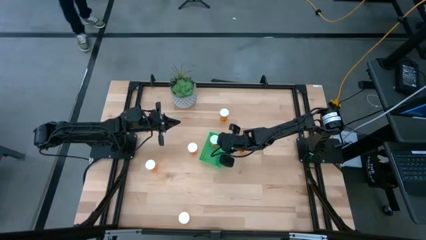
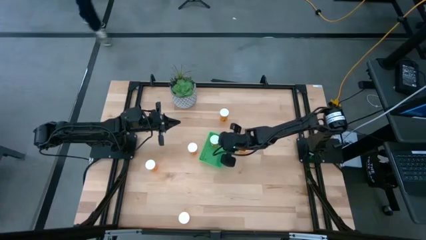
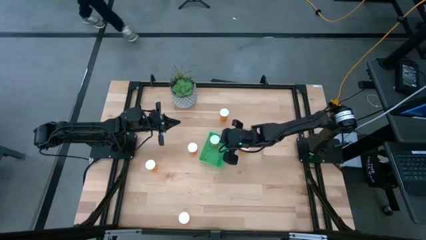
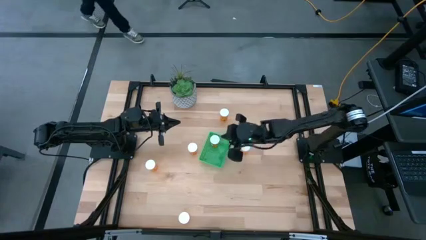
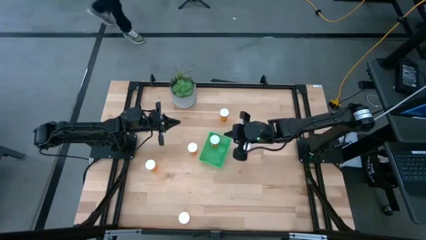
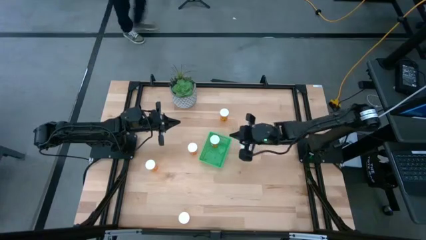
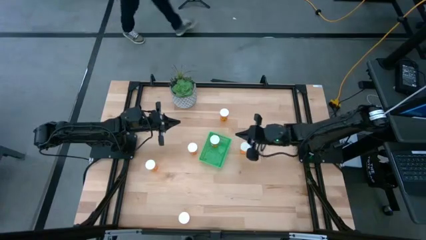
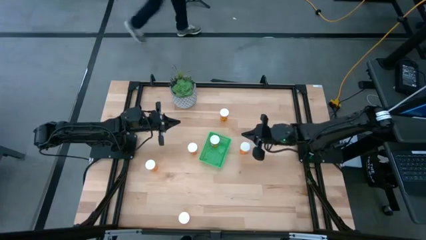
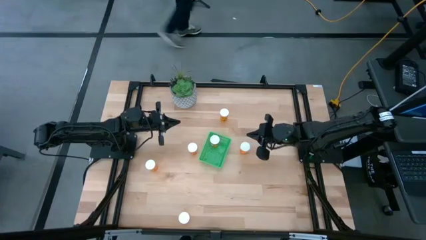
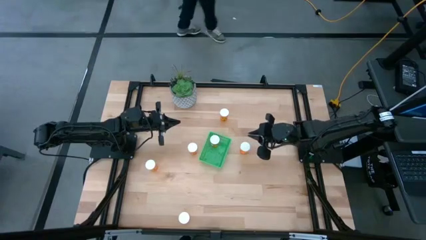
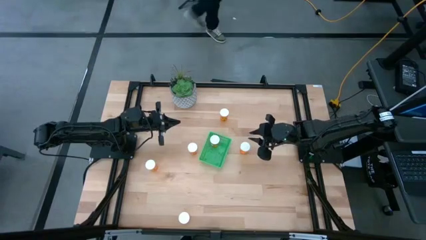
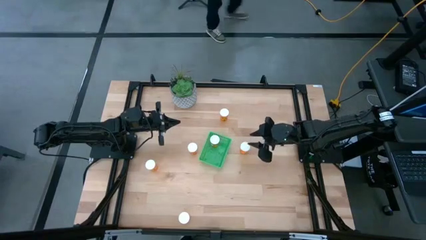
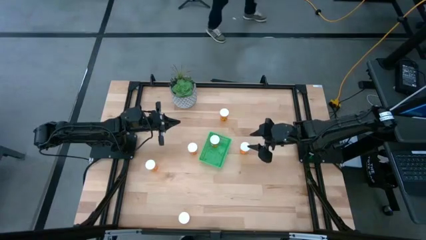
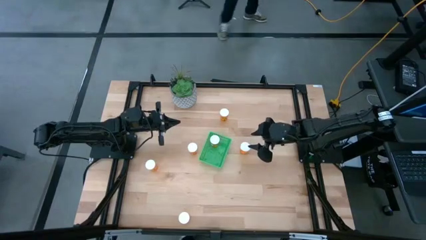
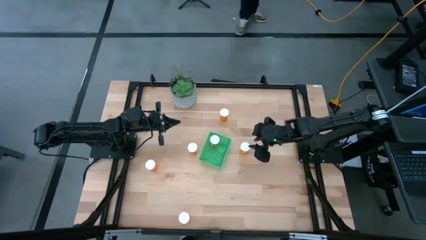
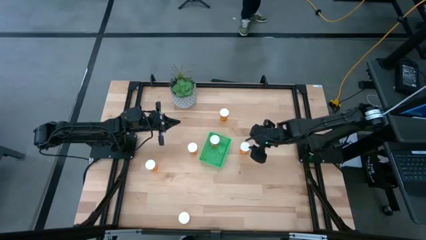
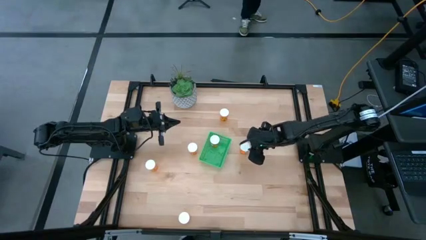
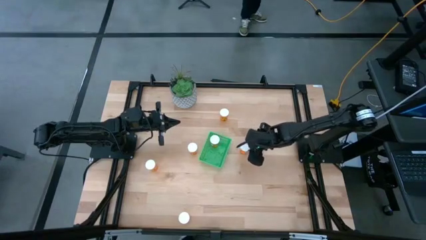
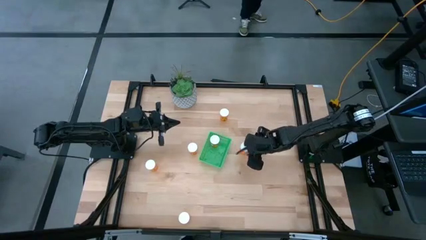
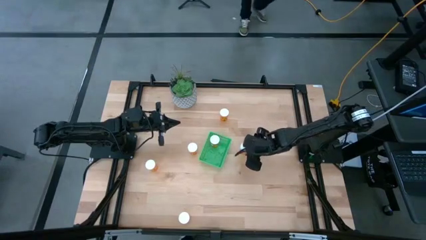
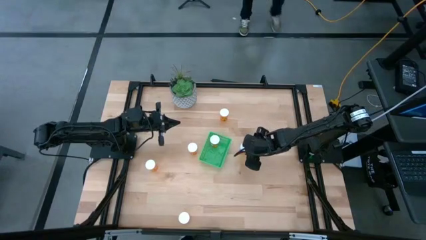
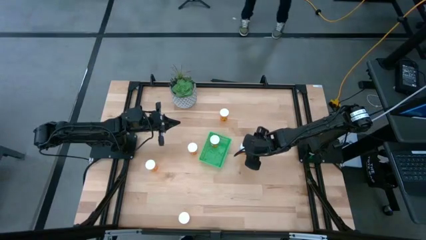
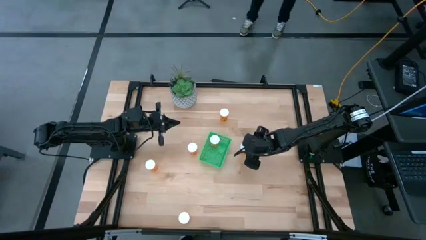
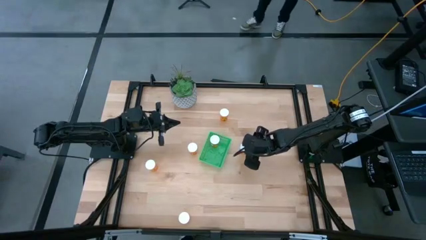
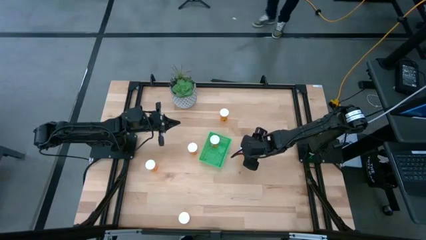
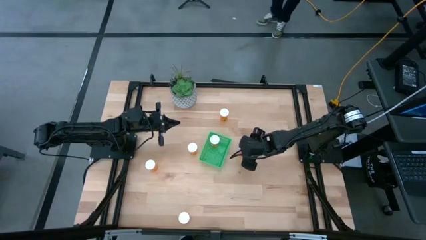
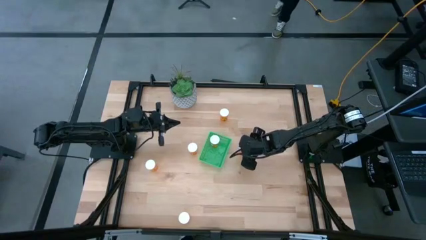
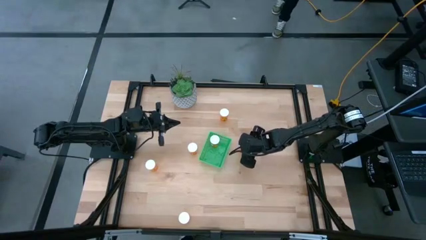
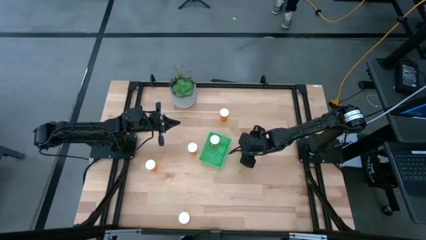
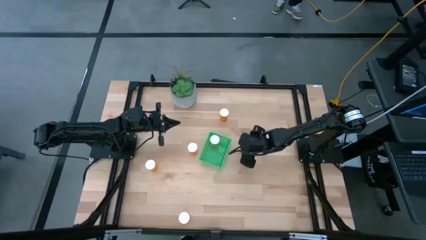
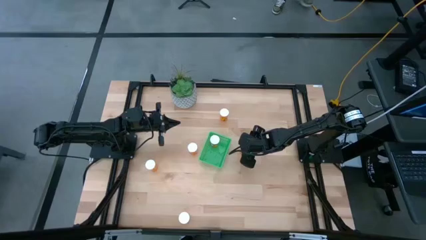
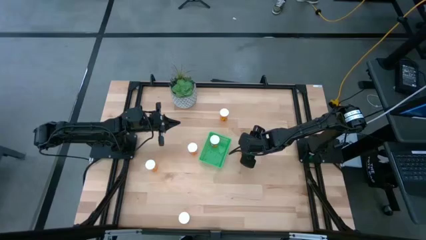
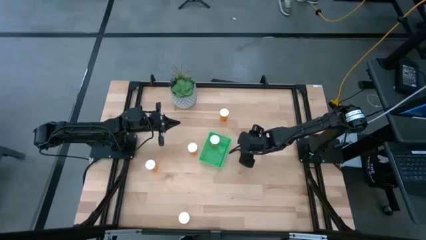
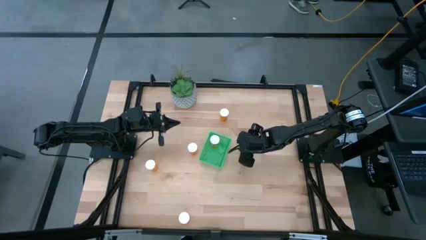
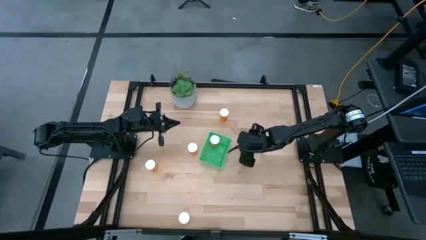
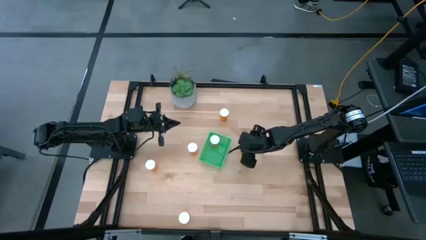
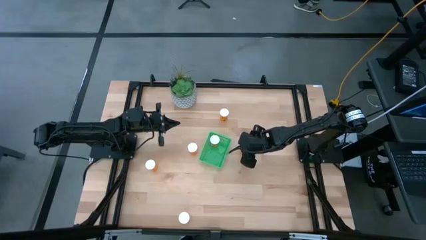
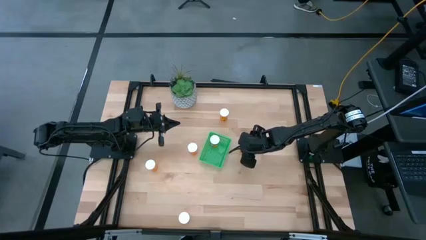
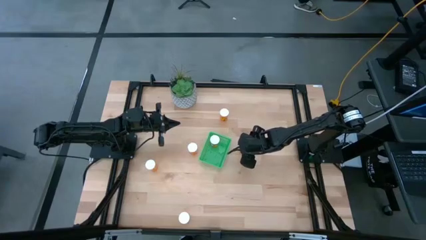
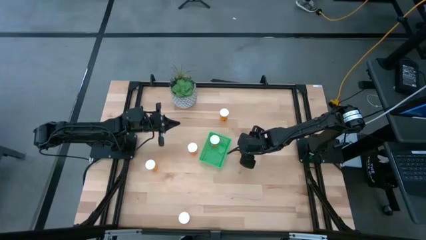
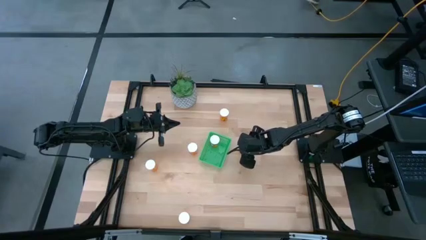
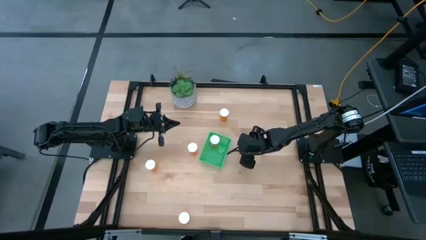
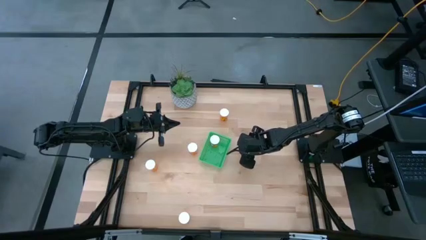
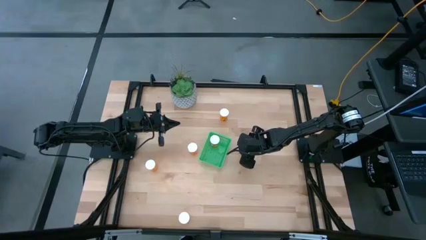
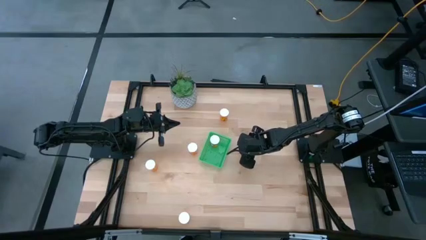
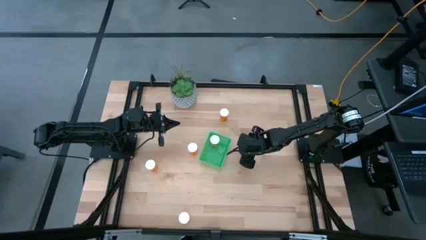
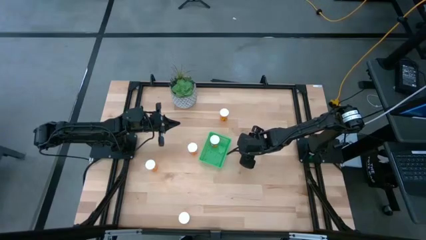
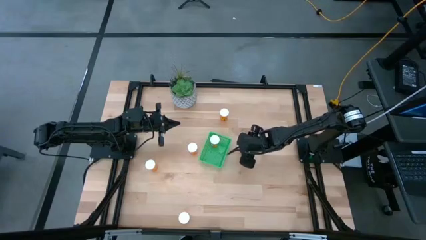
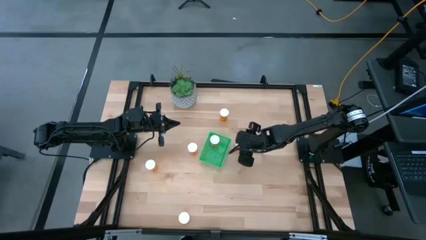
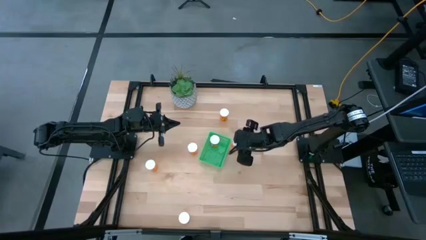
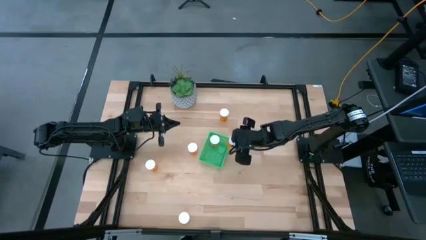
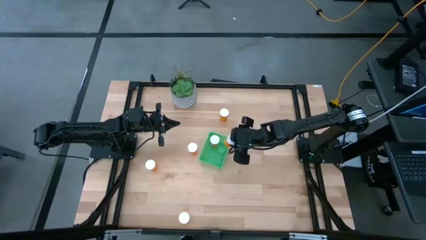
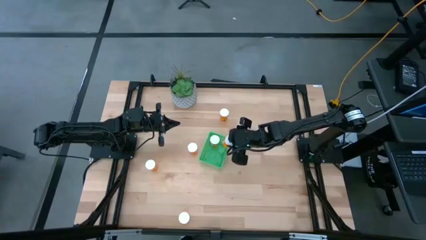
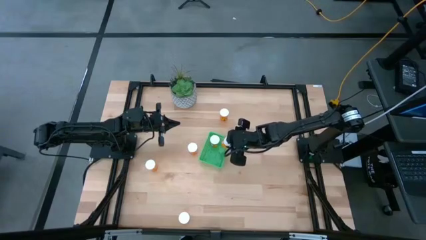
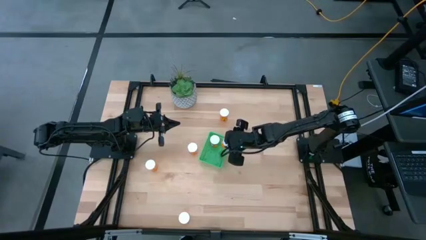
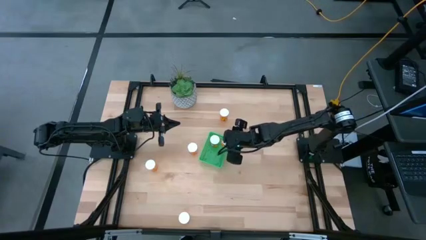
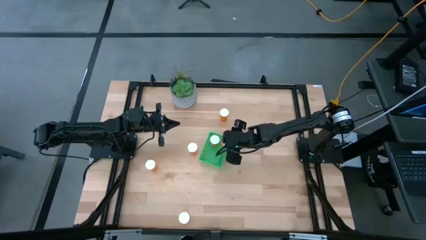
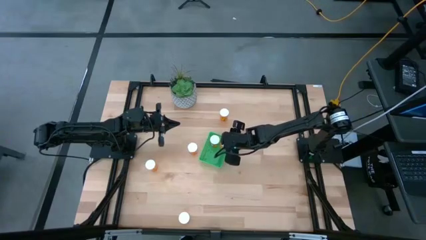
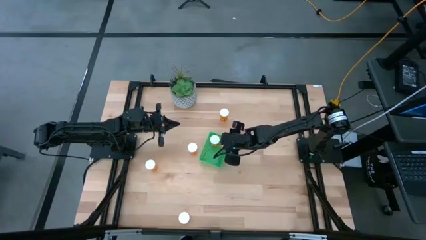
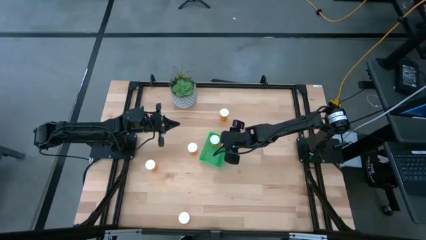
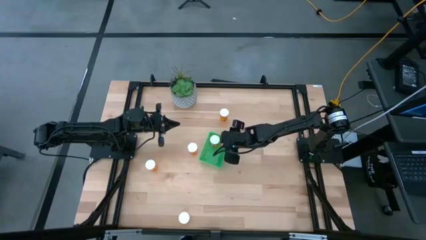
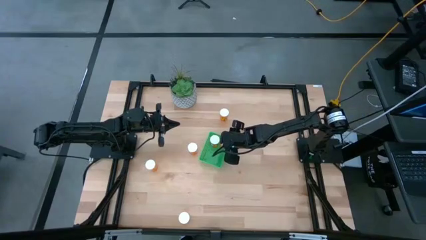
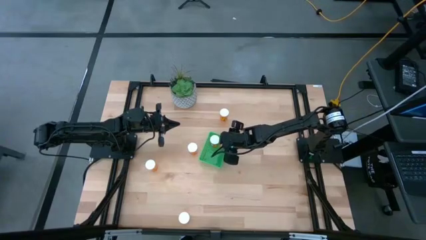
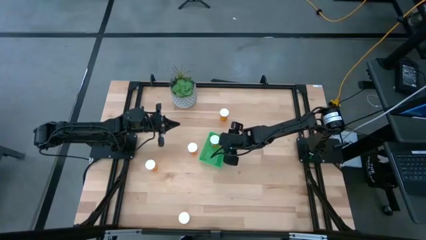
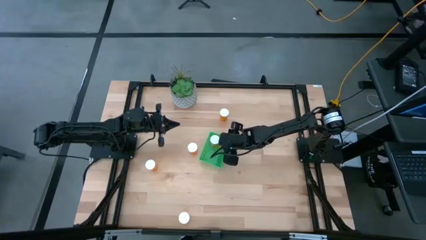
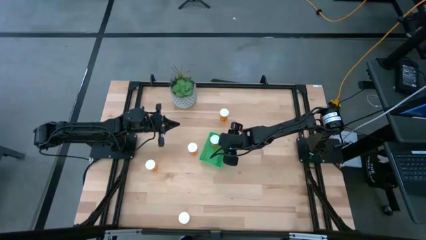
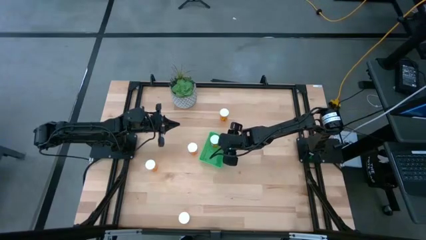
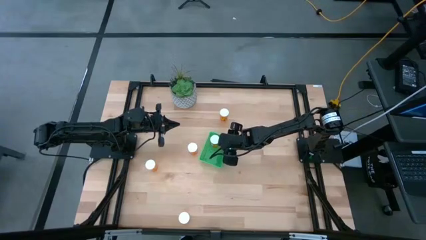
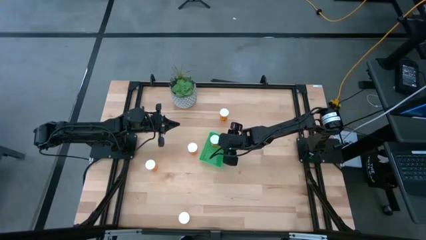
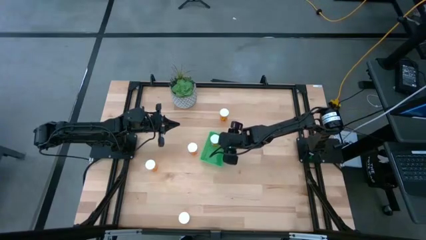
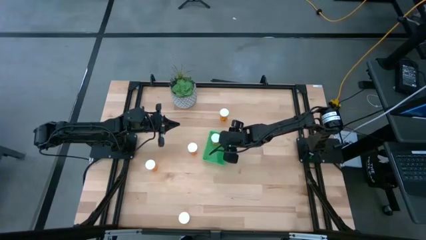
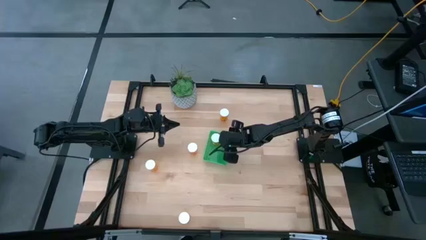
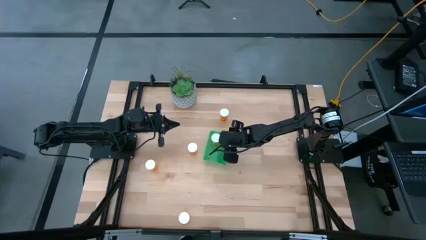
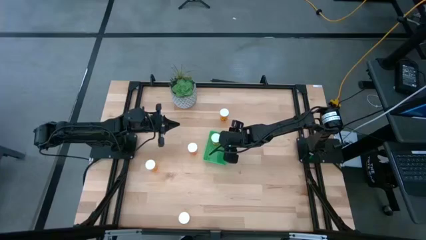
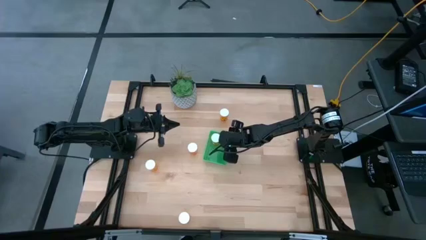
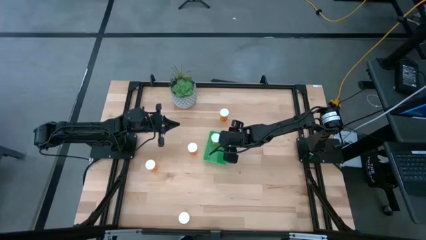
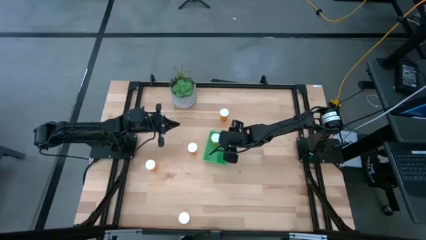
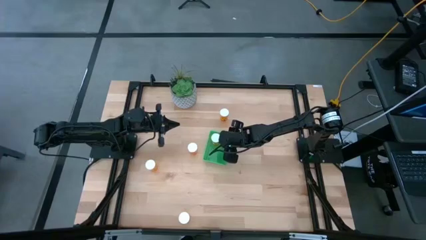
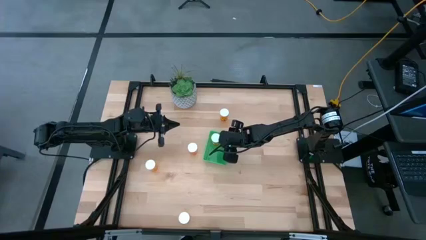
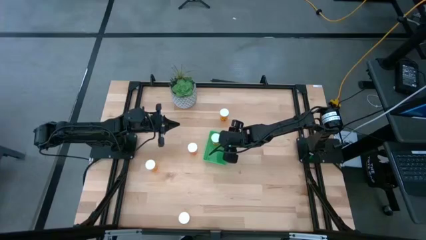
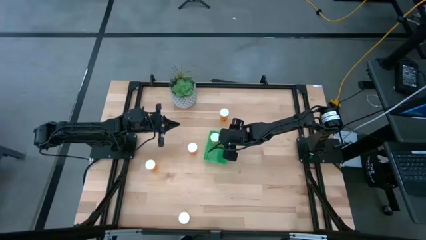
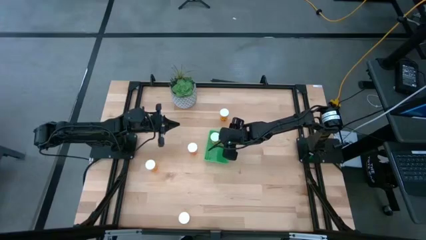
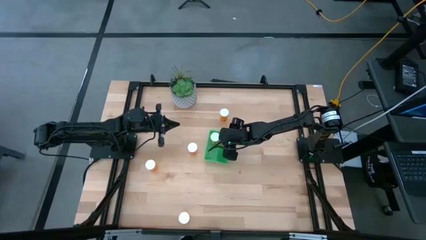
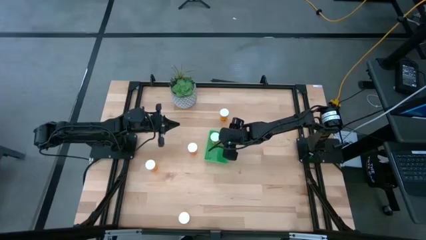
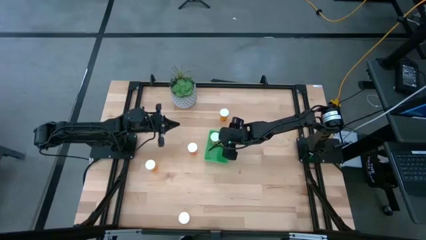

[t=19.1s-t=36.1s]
Task: Pick and place pill bottles into a basket
Put the orange pill bottle into the green basket
